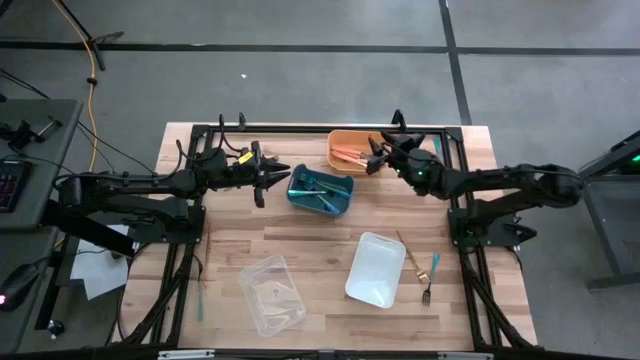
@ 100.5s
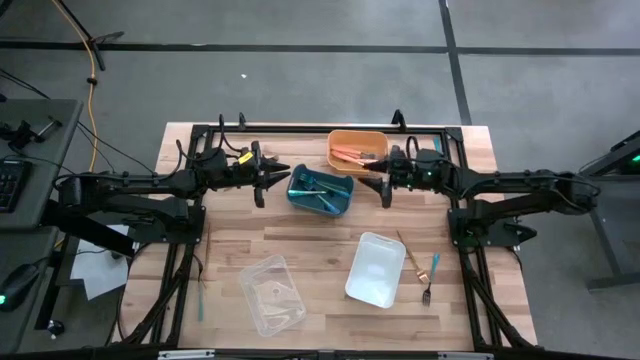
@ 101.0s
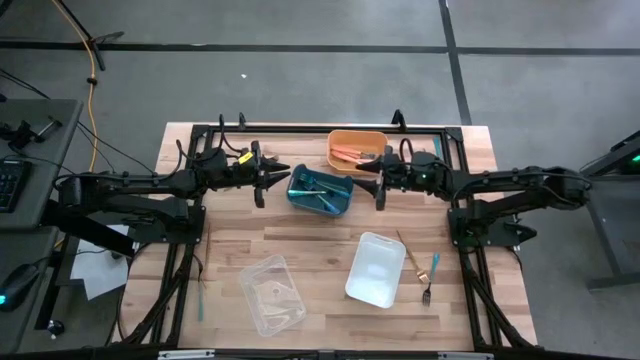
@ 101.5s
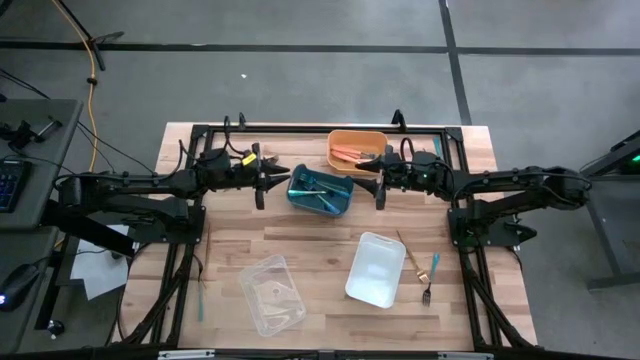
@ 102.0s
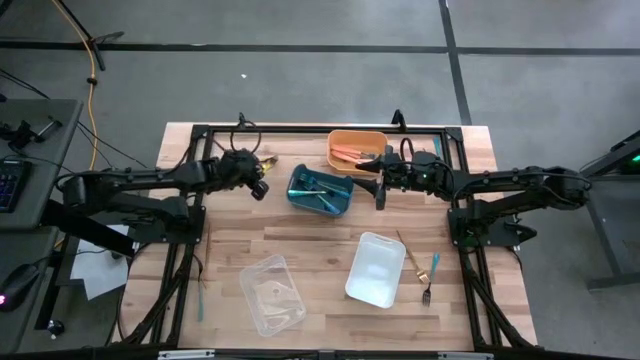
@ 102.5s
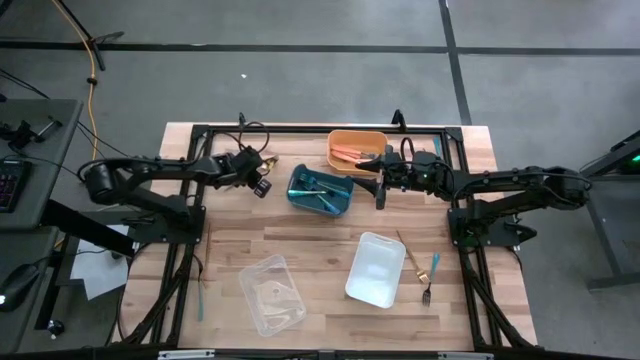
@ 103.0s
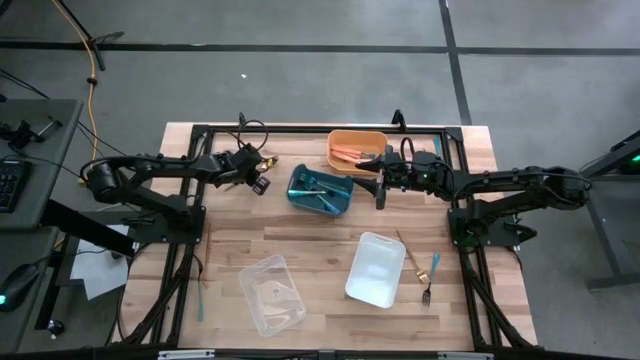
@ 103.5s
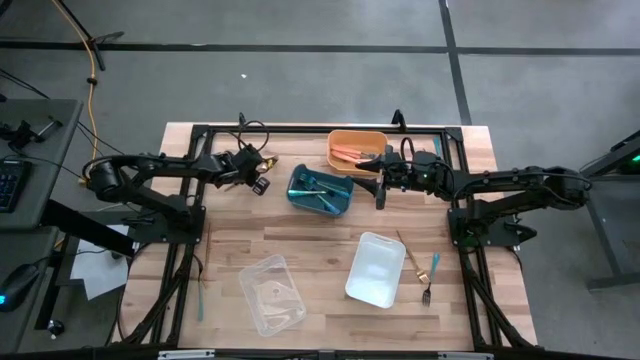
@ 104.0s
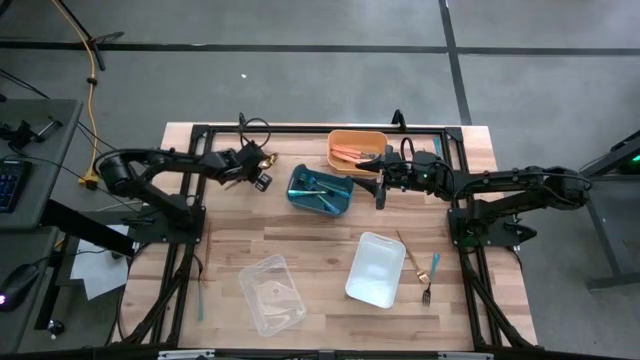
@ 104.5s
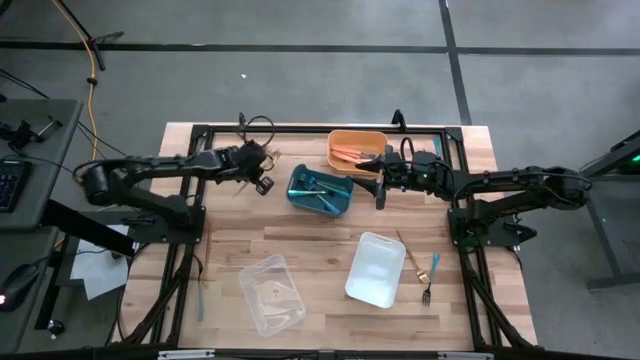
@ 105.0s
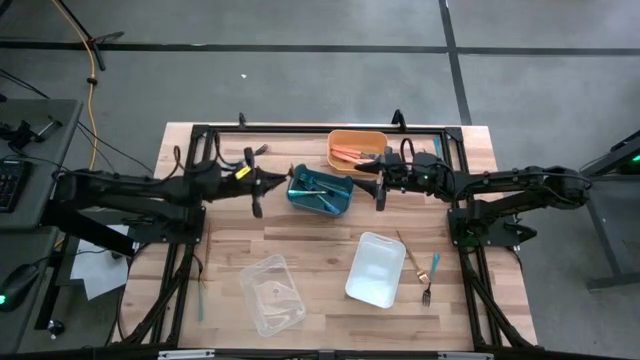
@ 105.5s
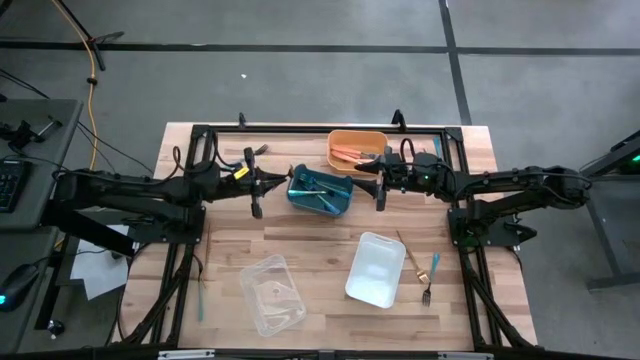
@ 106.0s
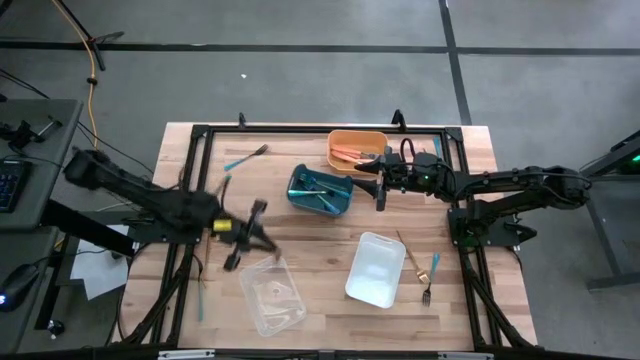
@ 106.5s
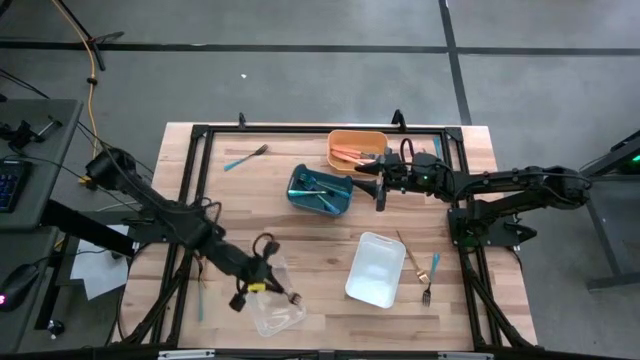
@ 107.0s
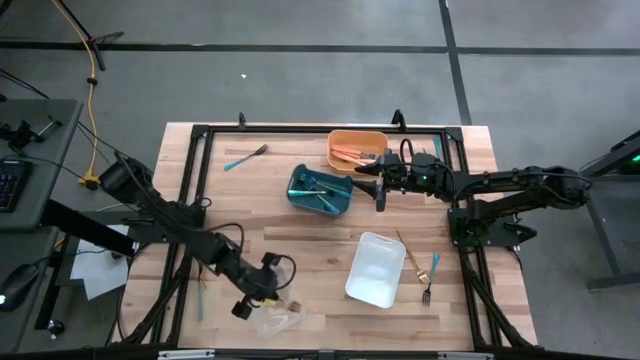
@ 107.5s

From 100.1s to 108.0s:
Task: Sort silverware by color (type)
Put the gold fork into the transparent bin

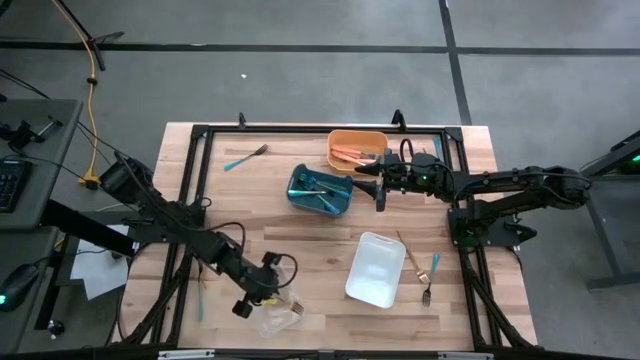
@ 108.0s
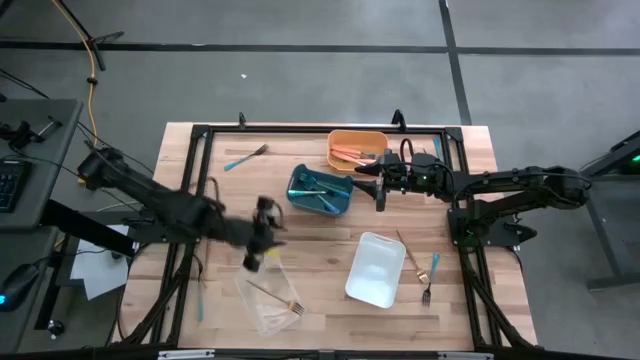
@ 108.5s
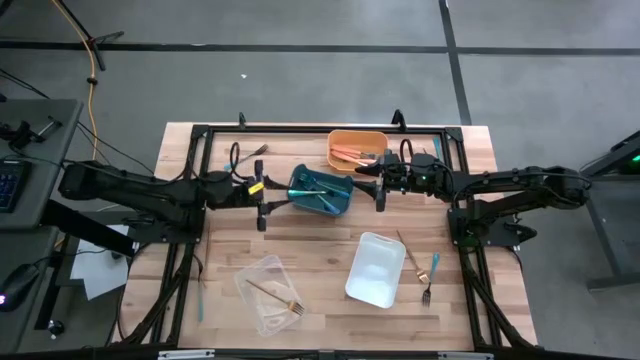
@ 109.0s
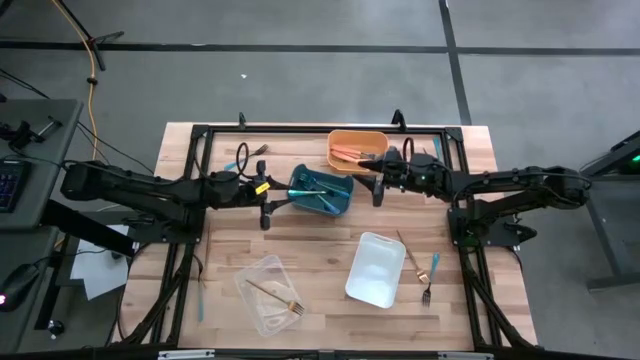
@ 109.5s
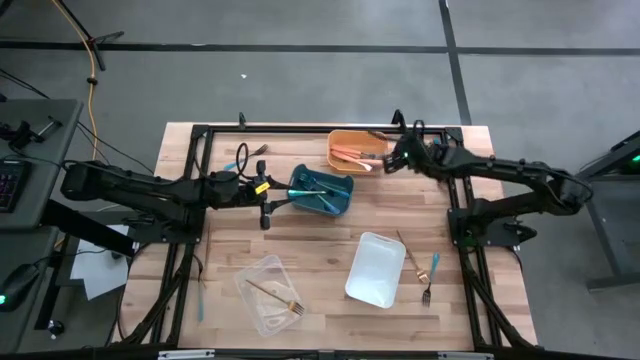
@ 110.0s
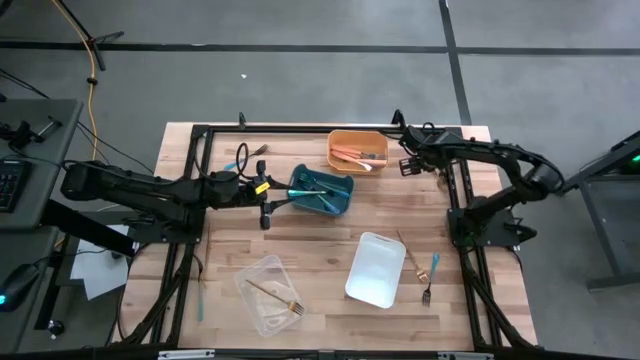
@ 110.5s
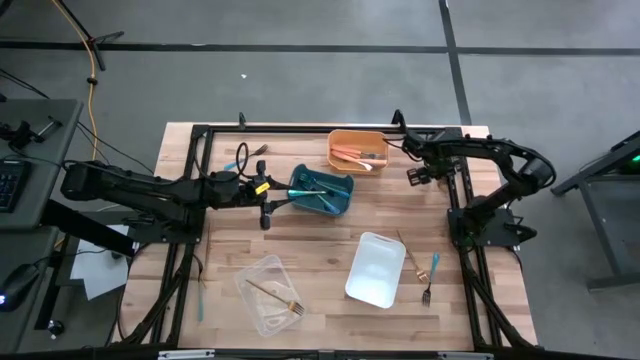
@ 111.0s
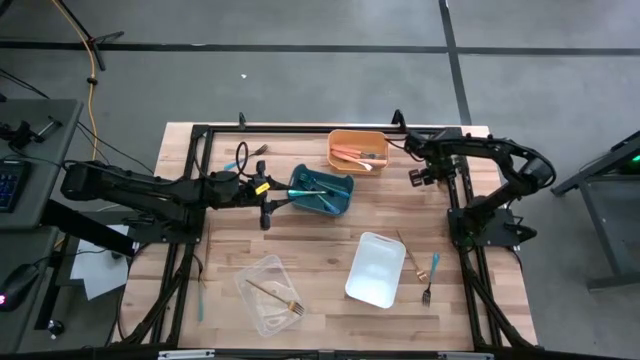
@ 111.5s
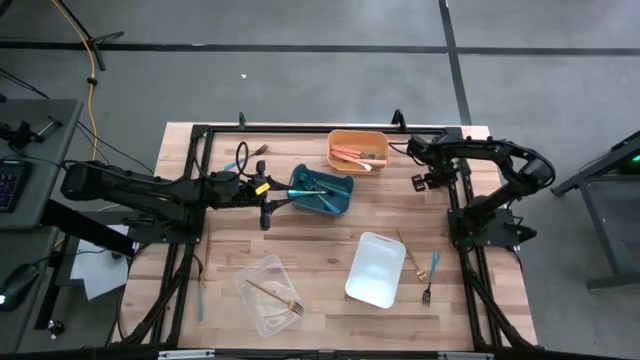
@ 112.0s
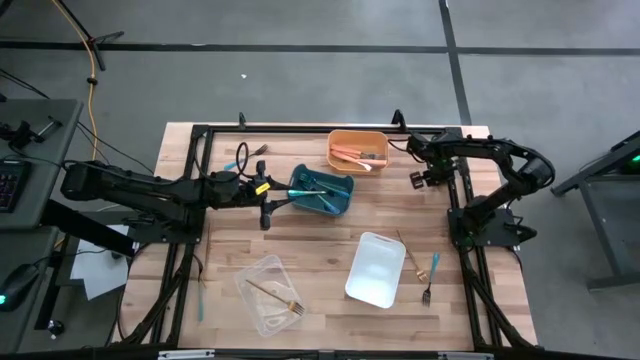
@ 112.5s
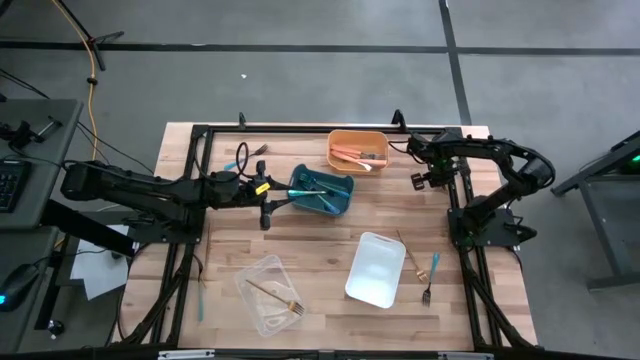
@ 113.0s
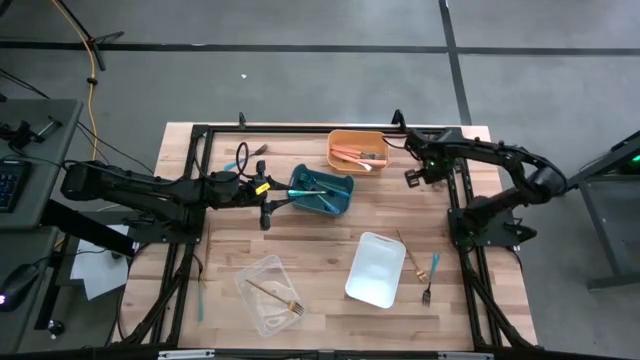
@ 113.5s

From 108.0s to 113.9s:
Put the gold fork into the transparent bin

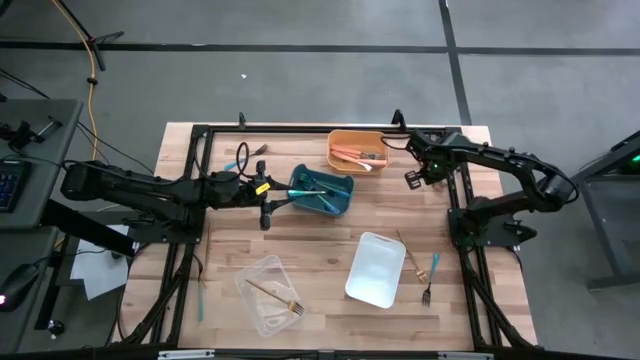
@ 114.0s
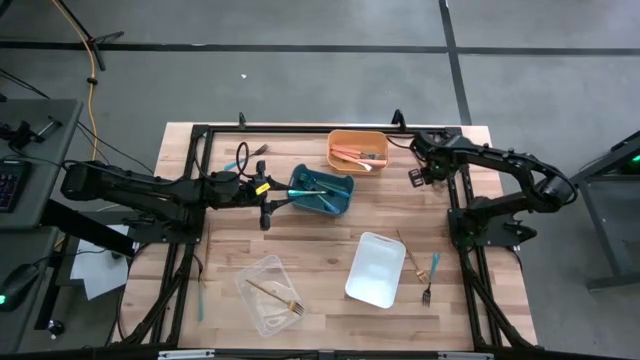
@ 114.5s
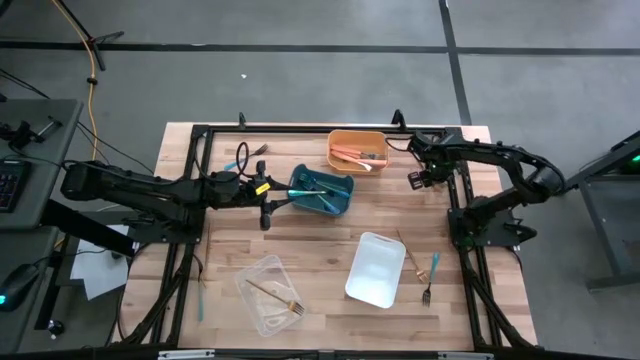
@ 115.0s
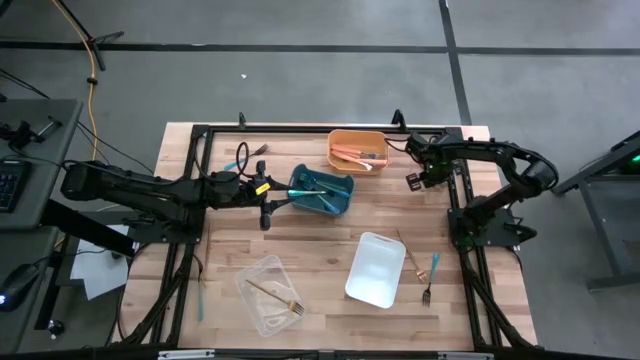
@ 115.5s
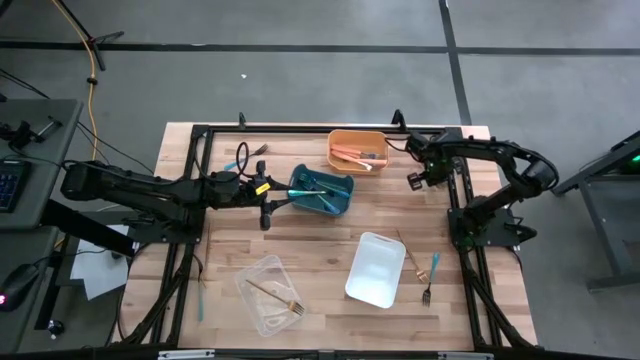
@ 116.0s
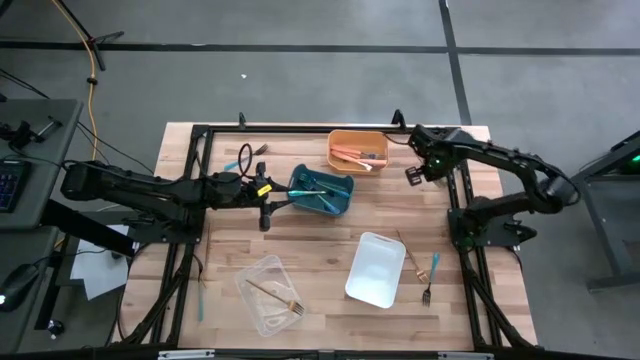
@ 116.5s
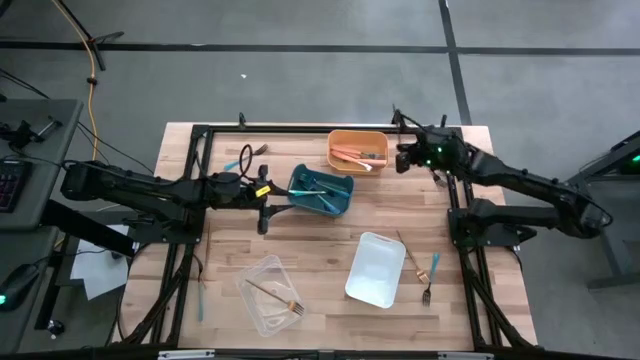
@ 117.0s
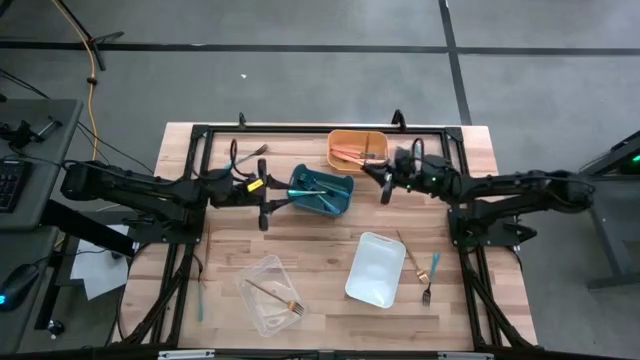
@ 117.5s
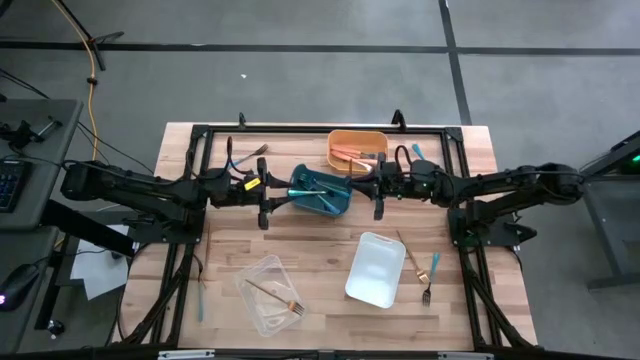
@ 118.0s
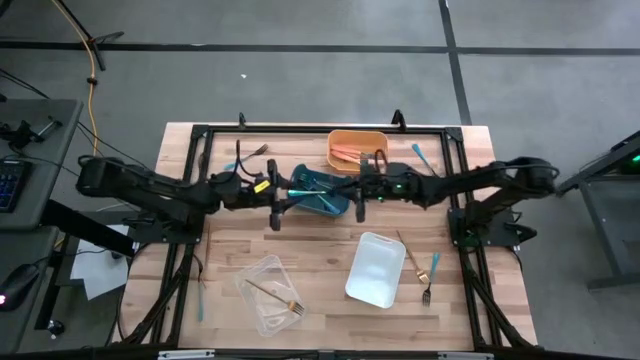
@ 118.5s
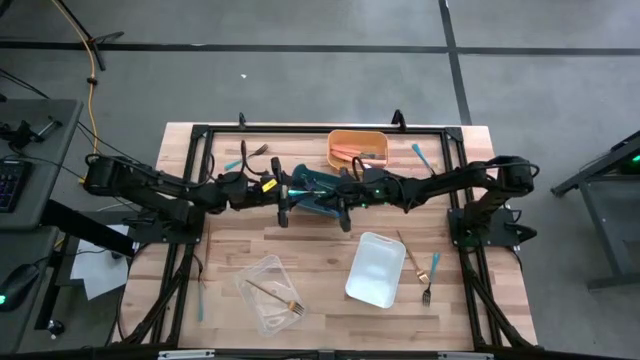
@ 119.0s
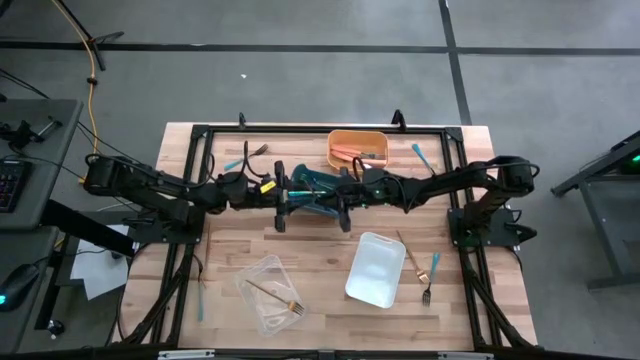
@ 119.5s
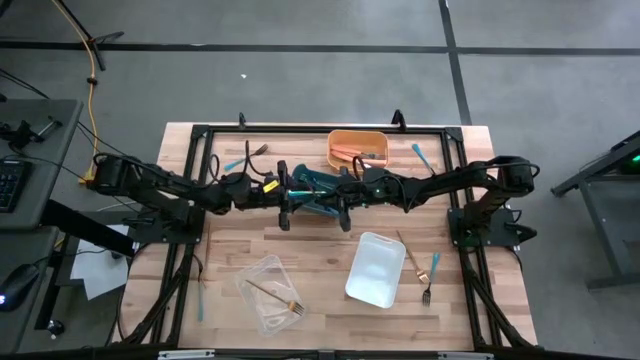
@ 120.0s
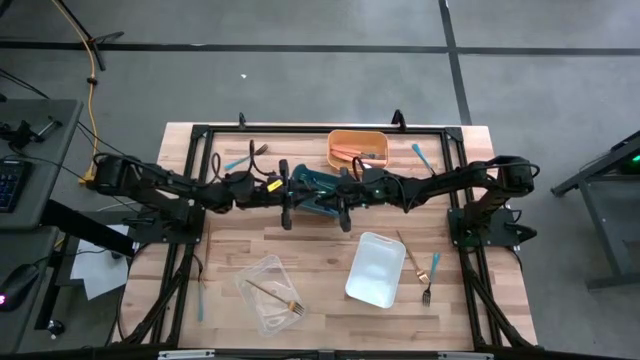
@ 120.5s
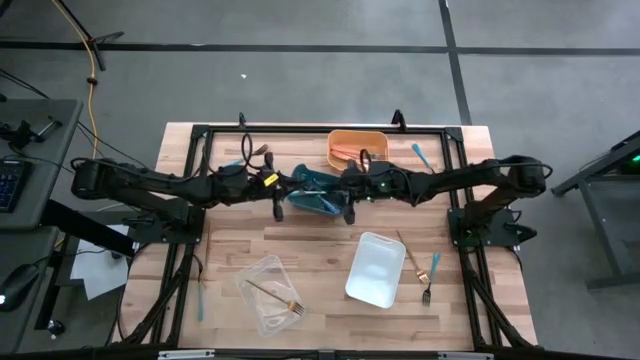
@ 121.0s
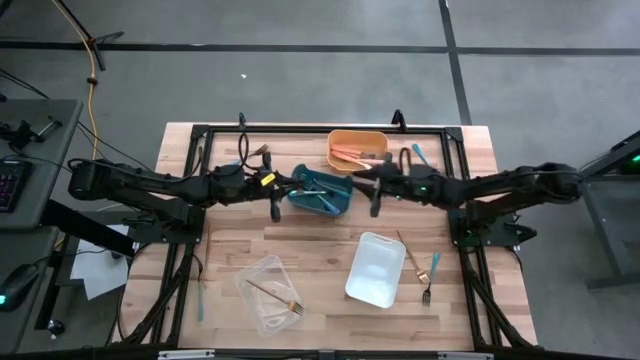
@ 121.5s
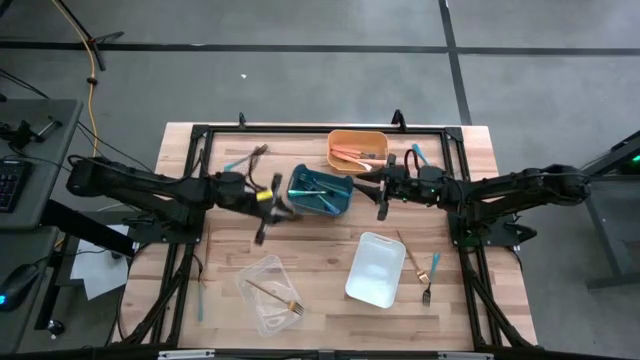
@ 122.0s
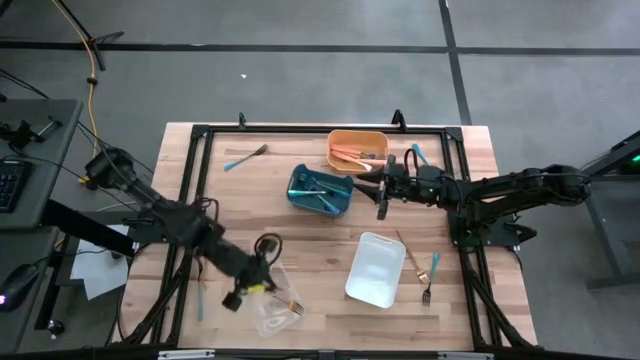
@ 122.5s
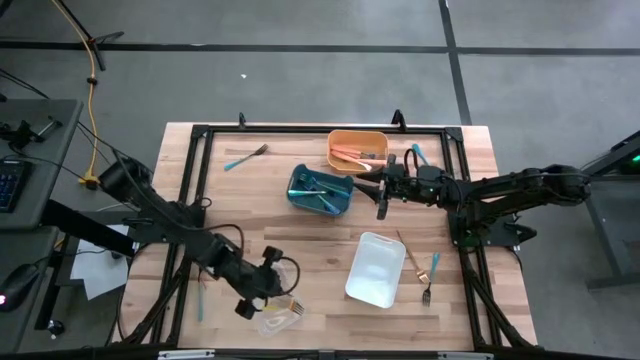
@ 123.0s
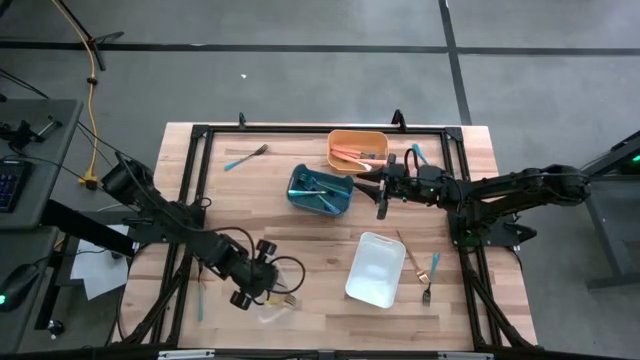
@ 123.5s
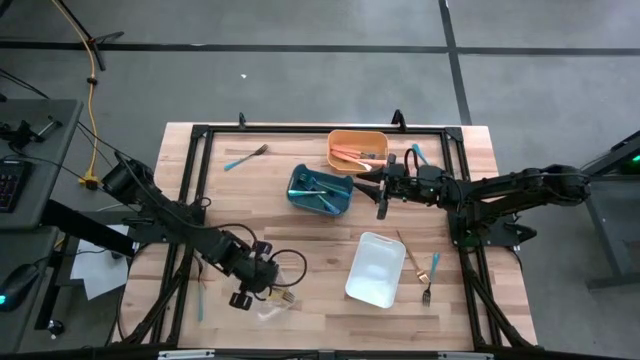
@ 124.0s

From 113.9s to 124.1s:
Put the gold fork into the transparent bin
